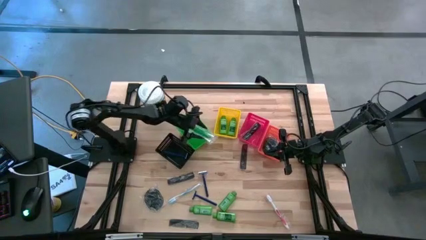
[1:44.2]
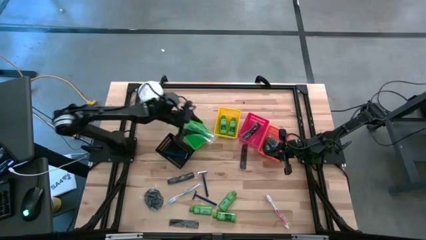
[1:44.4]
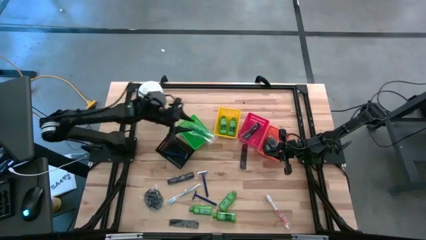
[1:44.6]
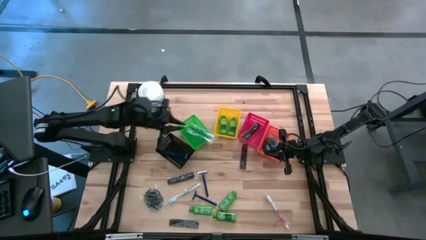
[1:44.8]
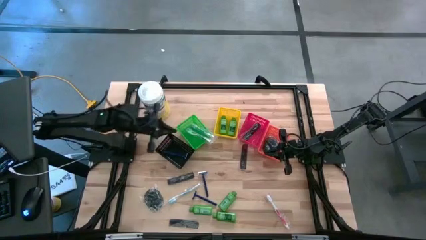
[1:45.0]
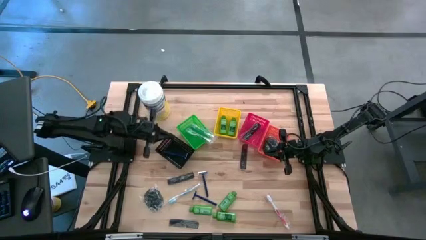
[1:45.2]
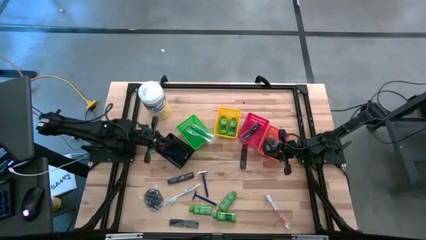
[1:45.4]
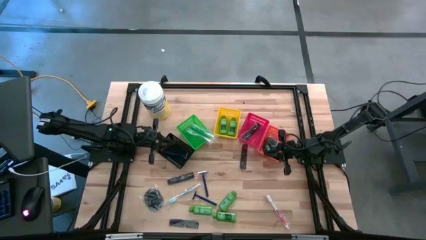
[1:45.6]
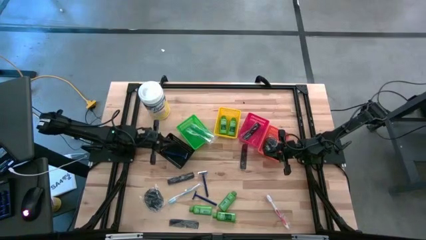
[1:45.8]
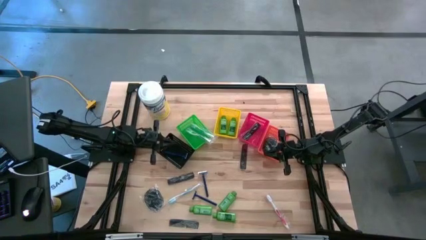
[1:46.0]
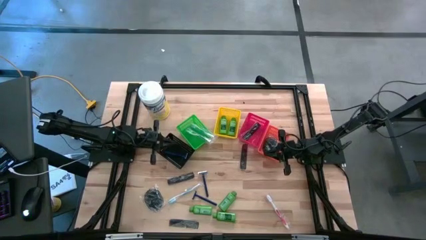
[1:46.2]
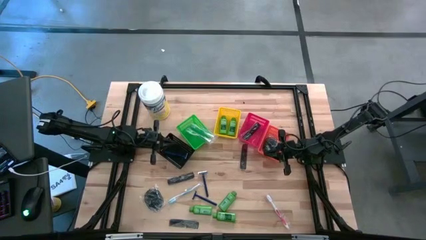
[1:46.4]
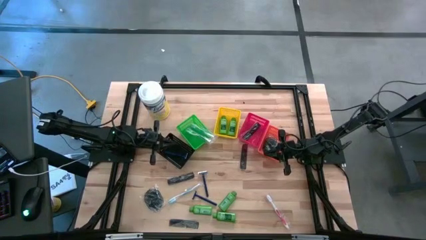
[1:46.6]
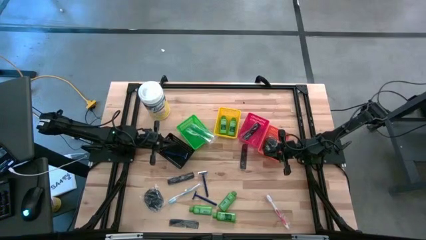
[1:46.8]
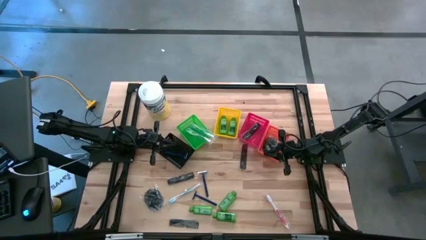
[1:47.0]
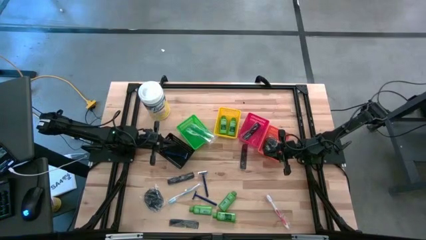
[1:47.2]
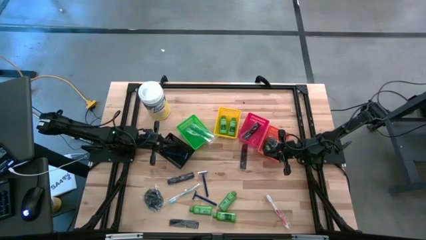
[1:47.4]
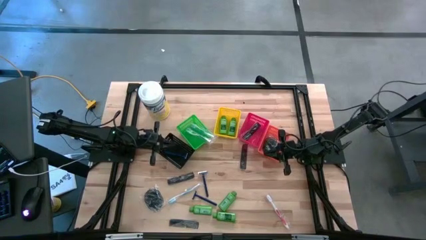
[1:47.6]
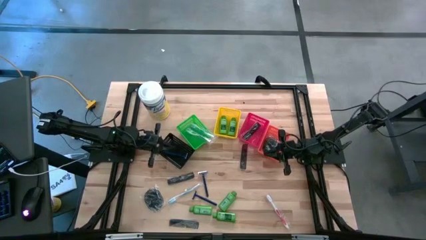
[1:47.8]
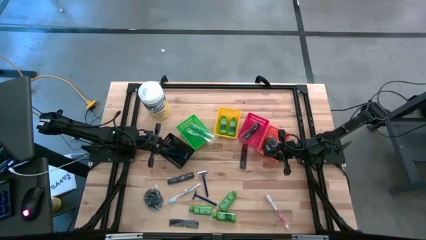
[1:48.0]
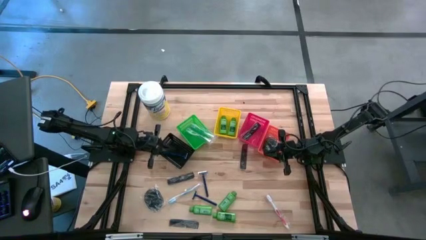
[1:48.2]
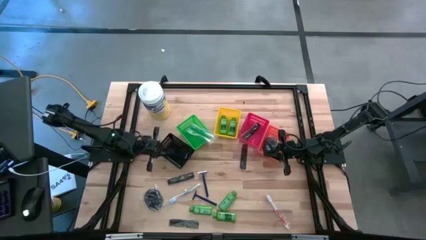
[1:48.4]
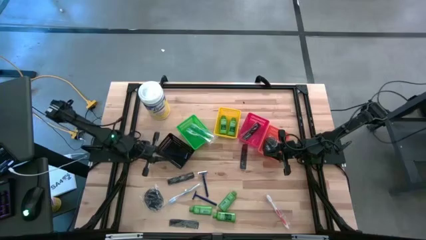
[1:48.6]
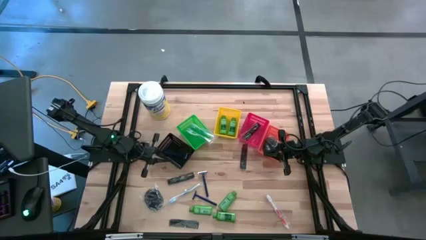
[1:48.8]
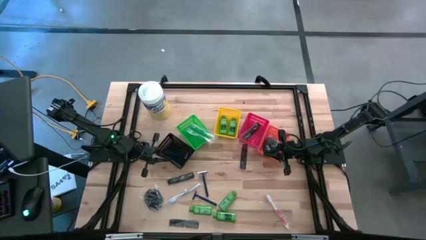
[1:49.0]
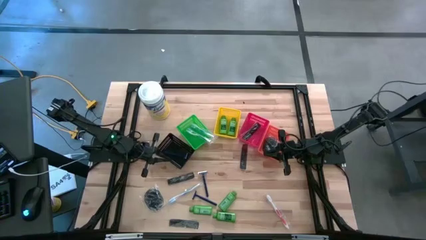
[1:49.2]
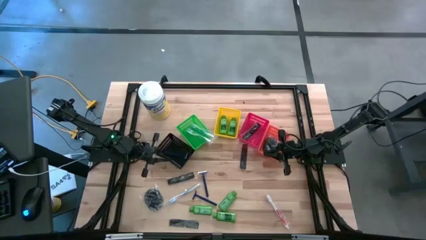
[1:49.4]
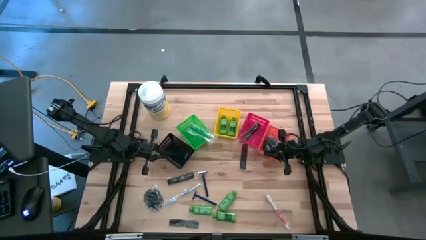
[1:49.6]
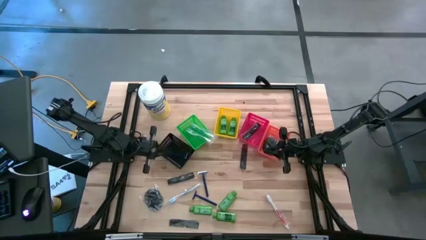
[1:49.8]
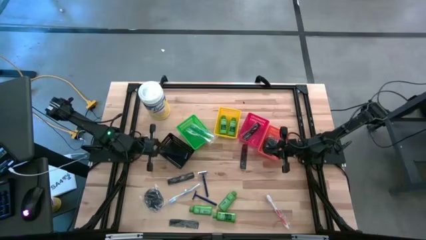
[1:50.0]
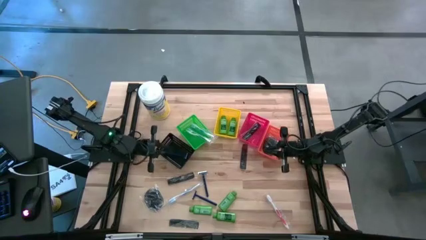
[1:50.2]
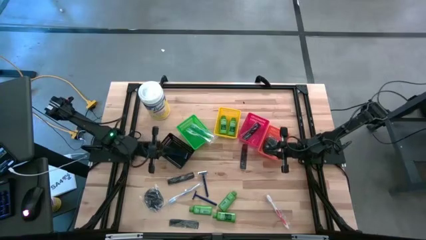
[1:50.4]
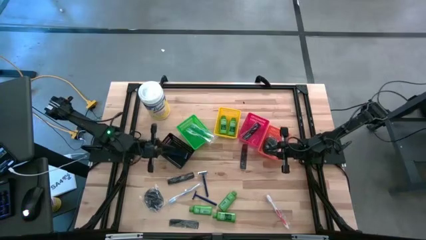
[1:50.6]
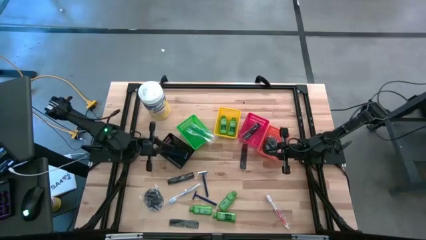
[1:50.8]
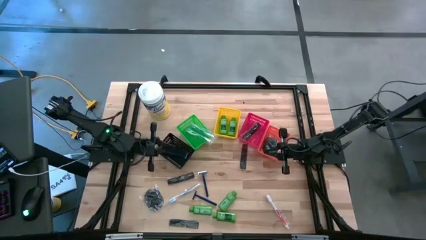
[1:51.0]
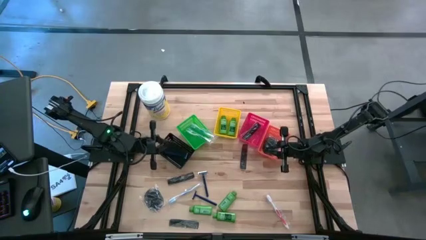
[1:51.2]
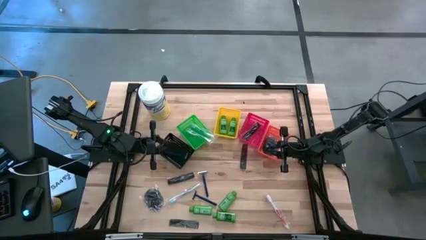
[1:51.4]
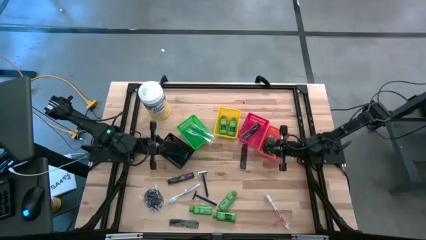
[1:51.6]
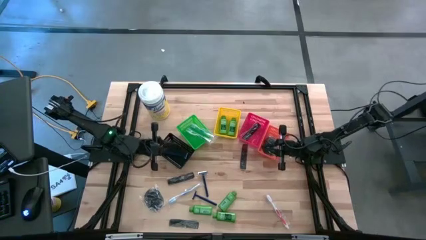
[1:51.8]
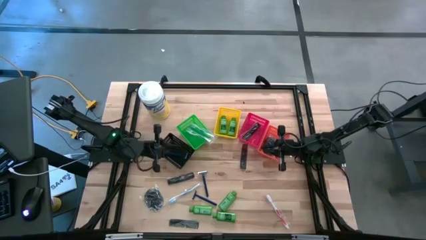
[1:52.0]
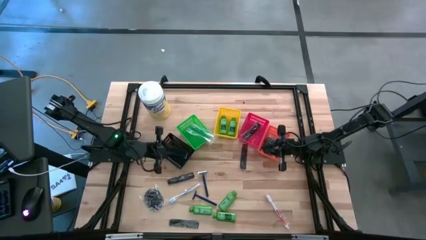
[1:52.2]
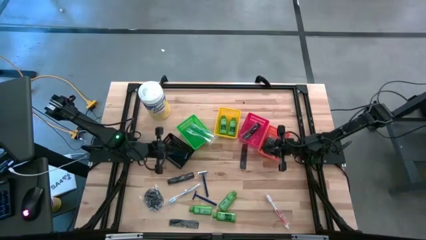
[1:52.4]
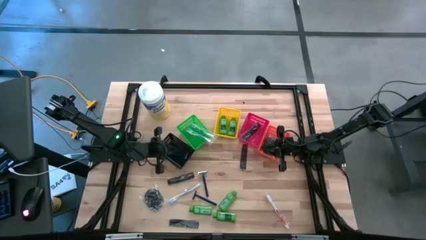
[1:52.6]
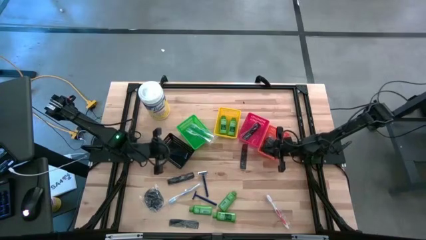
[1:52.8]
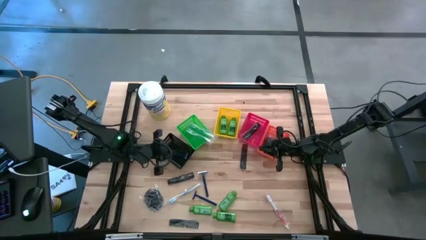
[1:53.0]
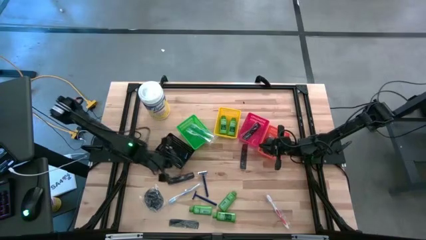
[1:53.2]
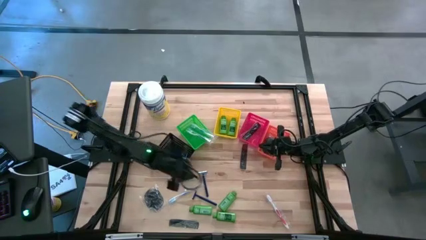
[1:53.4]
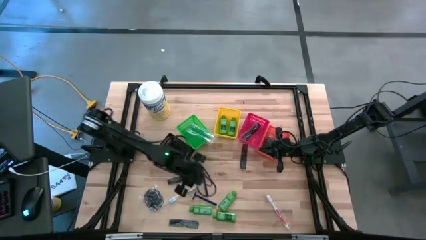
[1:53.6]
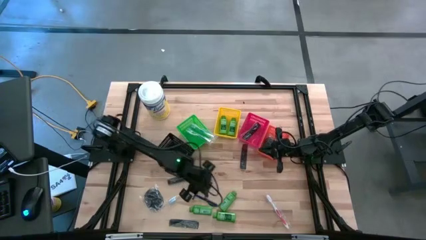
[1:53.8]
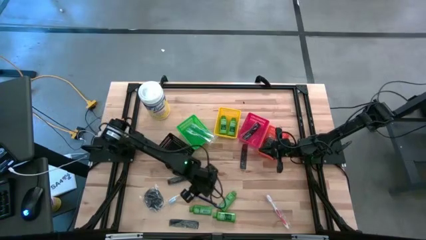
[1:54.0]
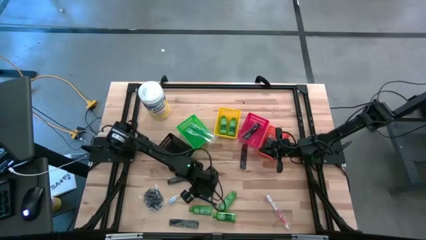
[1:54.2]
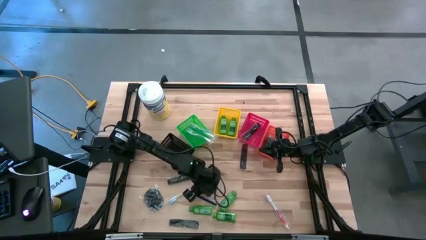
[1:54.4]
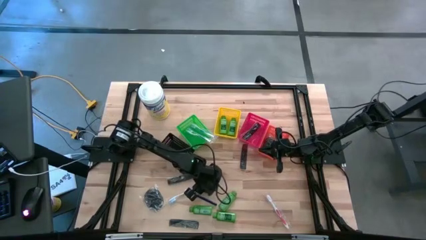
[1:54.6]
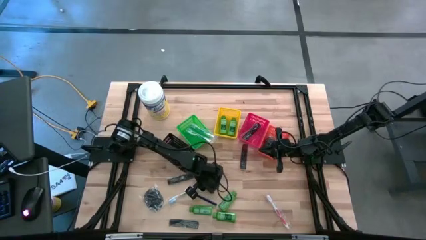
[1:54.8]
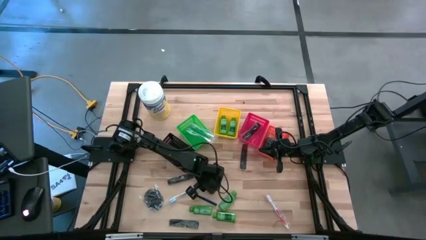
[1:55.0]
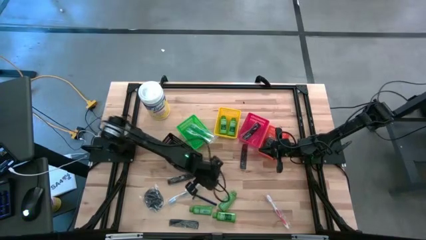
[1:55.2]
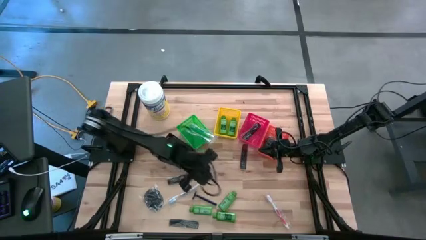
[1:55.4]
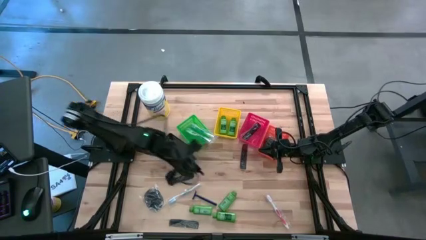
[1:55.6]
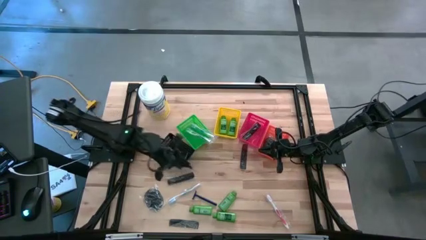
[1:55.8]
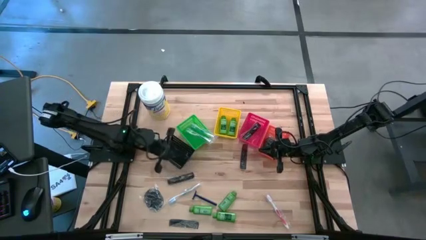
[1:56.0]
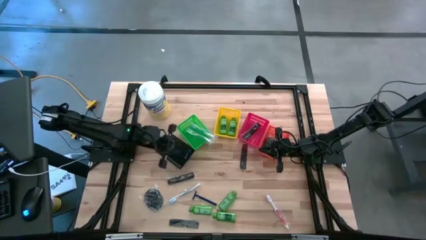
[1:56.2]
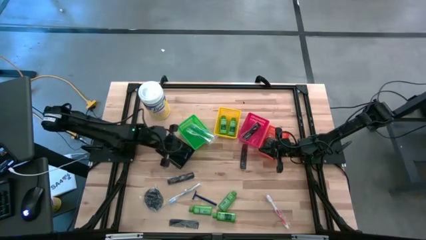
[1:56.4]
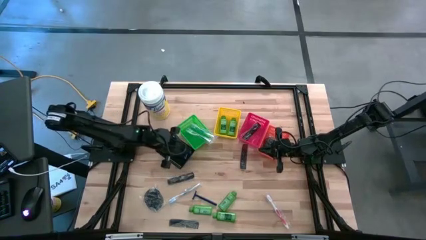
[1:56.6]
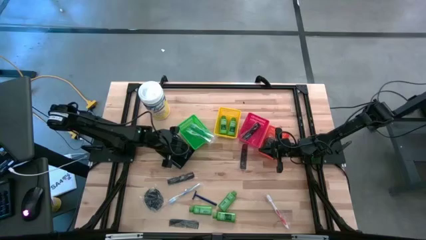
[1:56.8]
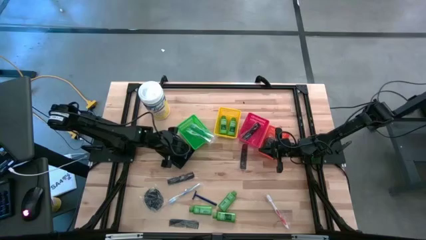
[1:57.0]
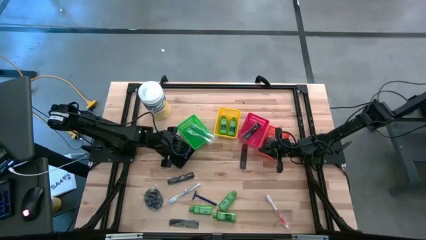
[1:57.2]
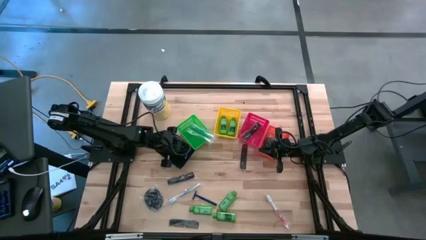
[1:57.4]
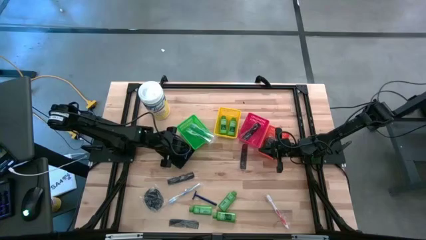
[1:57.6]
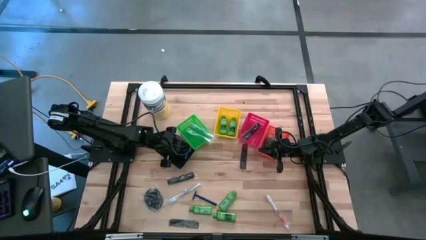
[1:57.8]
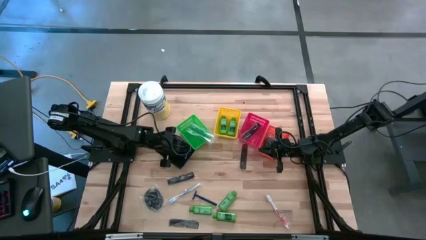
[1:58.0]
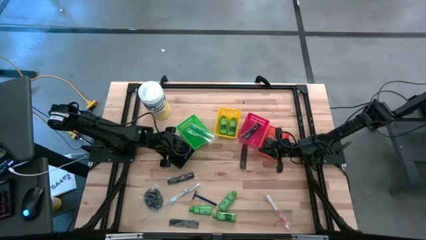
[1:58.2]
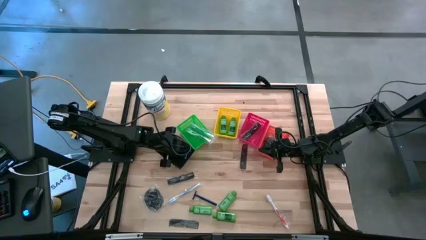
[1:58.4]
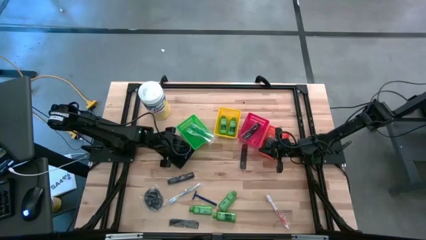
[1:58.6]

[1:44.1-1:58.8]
Task: Pick & Place Travel size toiletries
Put the blue razor into the black bin

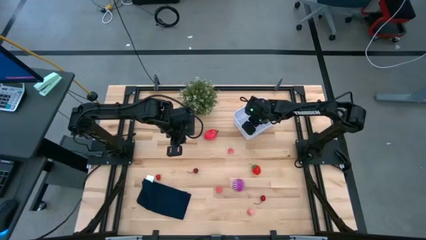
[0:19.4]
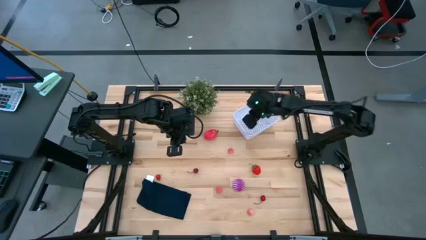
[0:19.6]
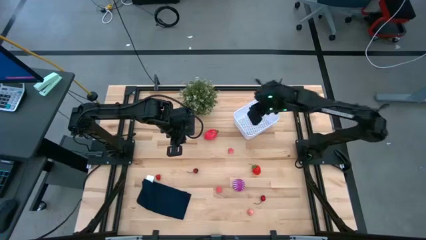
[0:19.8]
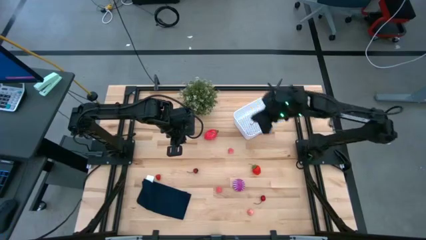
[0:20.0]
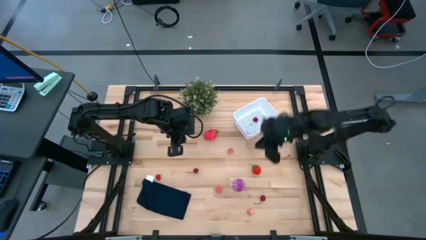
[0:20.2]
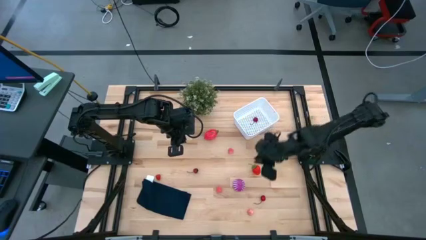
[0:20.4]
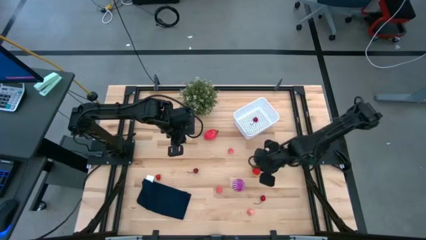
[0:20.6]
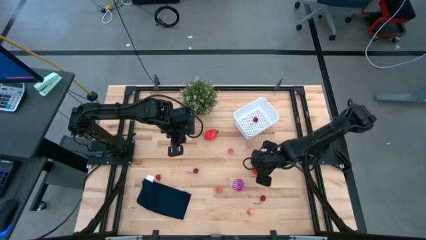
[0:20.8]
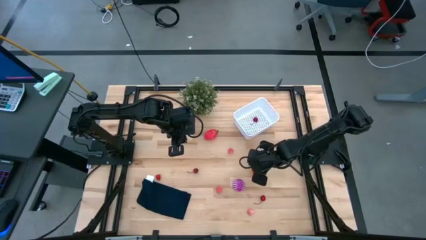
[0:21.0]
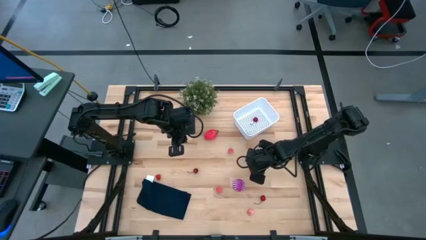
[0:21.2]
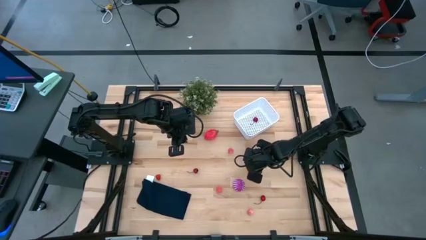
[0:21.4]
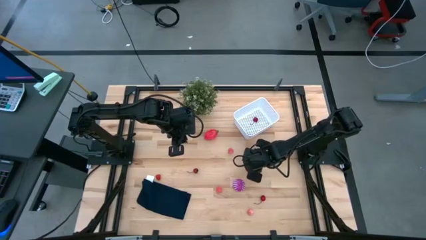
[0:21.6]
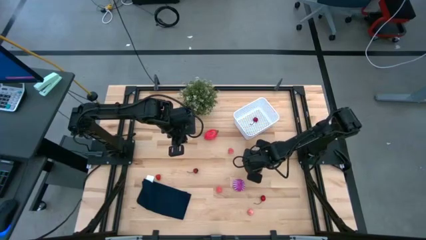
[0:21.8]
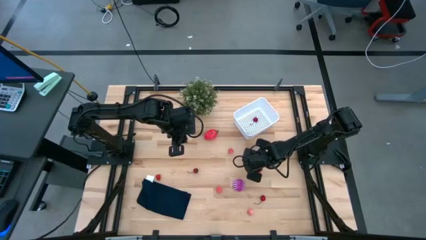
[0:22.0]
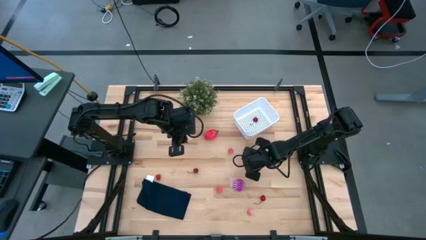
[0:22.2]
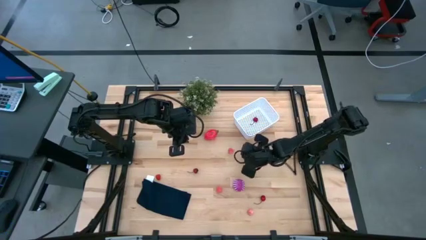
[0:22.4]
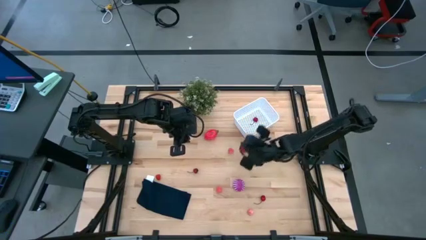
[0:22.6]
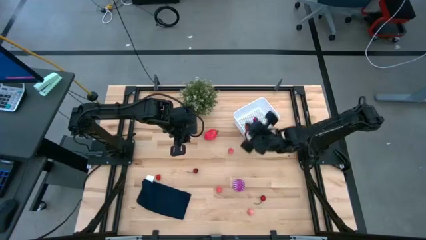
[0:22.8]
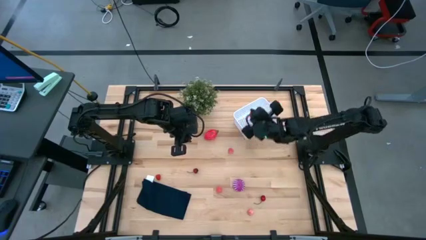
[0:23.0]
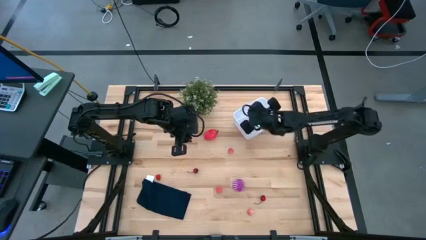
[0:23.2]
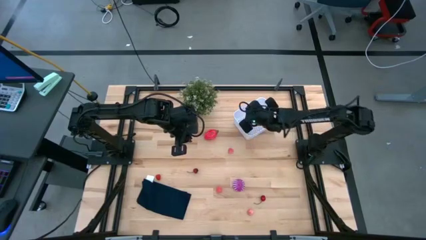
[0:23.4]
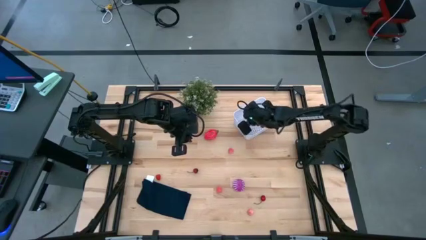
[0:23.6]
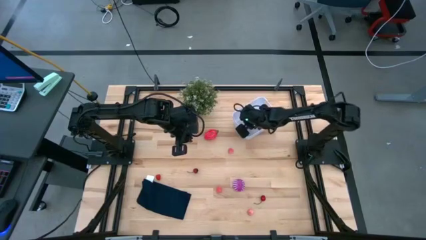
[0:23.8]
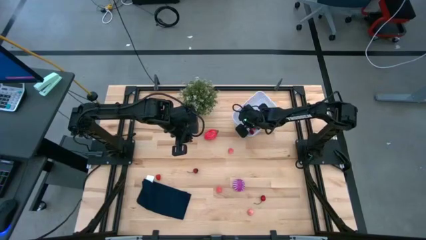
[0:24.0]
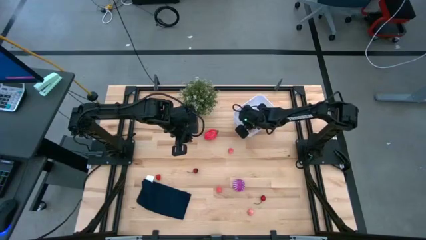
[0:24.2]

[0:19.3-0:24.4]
Task: Pick and placing Produce into tupperware
Put the strawberry into the bin
